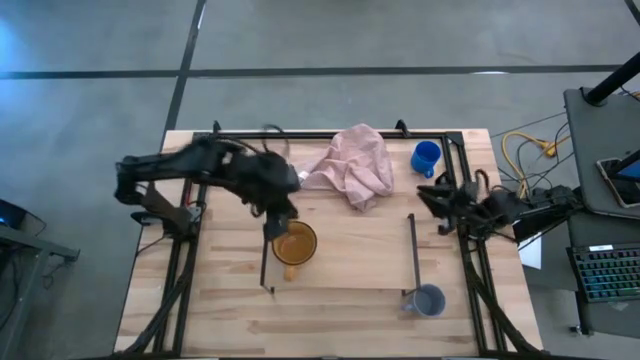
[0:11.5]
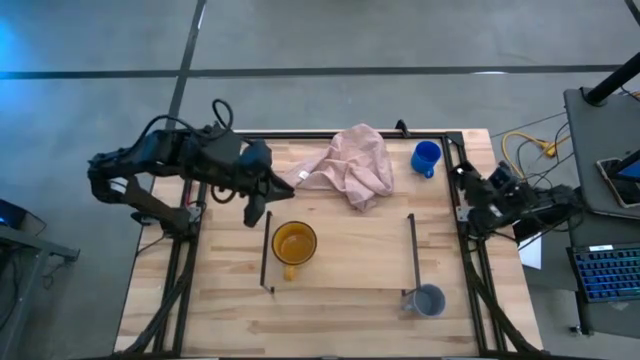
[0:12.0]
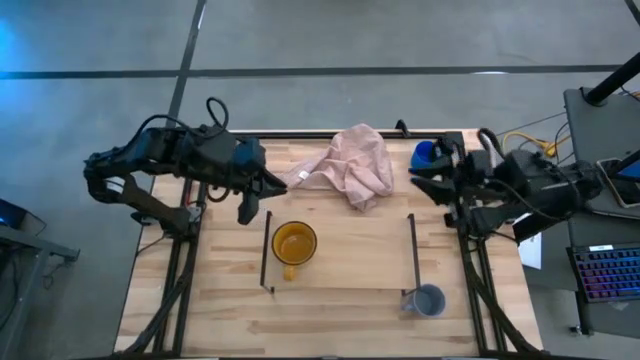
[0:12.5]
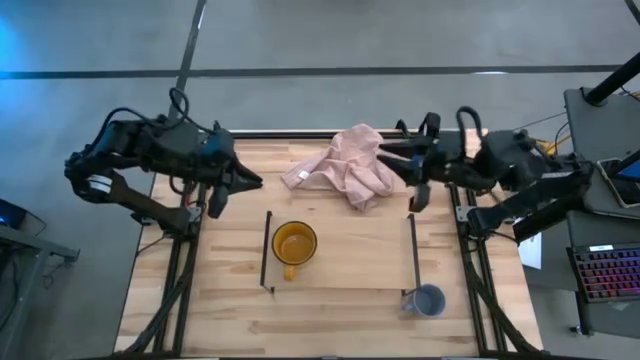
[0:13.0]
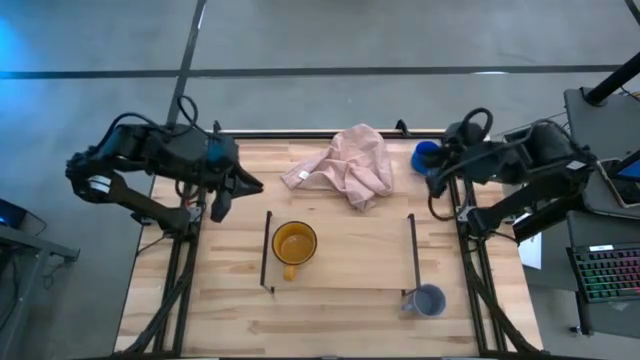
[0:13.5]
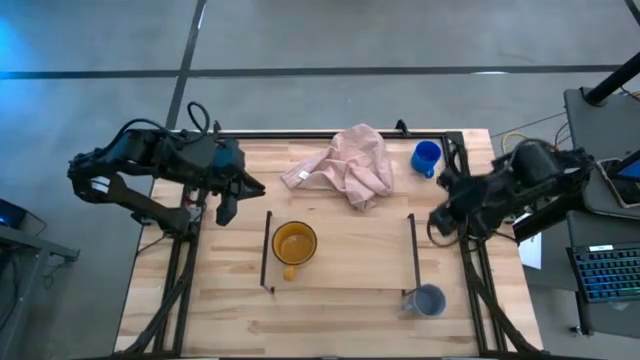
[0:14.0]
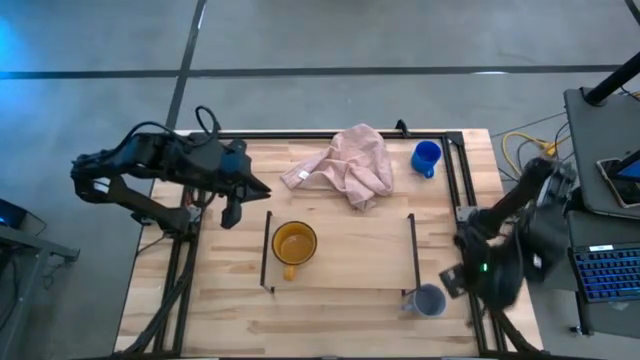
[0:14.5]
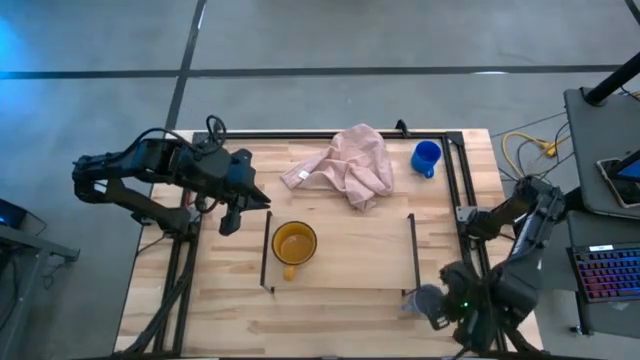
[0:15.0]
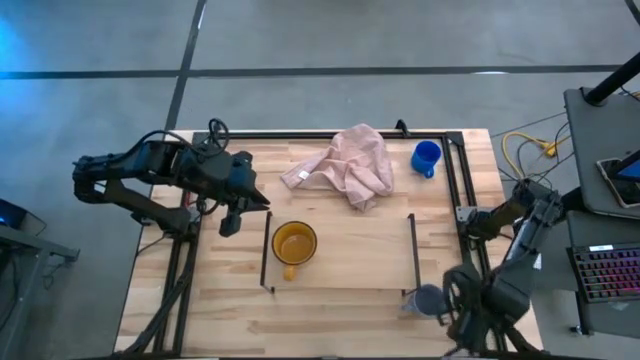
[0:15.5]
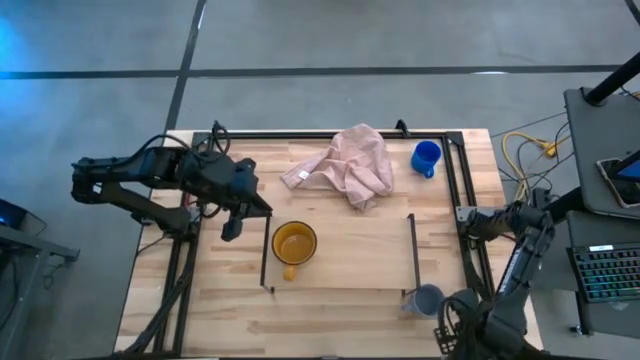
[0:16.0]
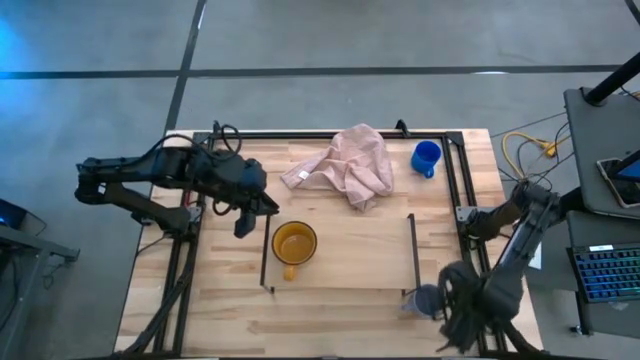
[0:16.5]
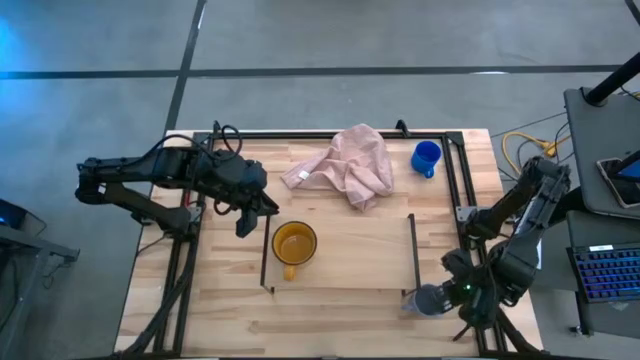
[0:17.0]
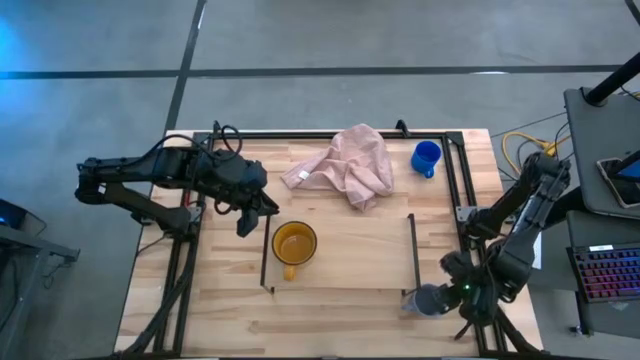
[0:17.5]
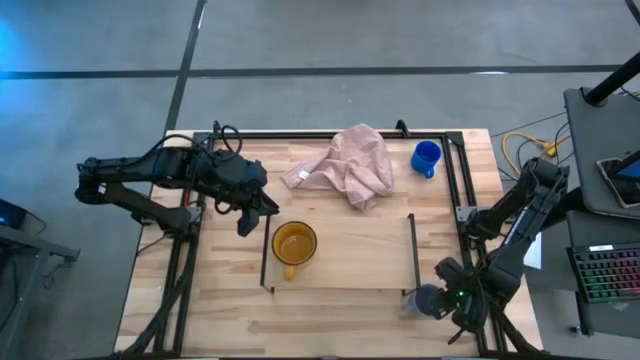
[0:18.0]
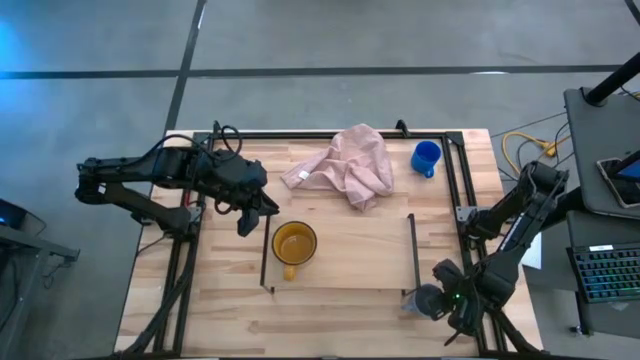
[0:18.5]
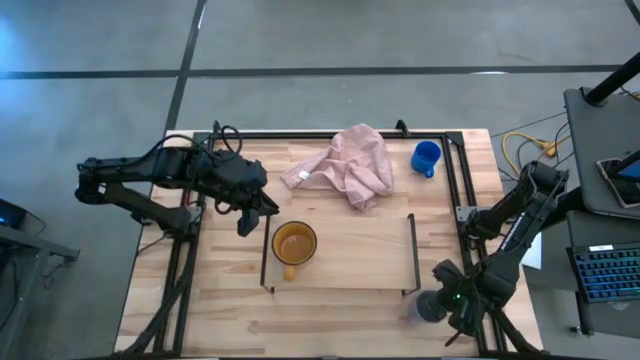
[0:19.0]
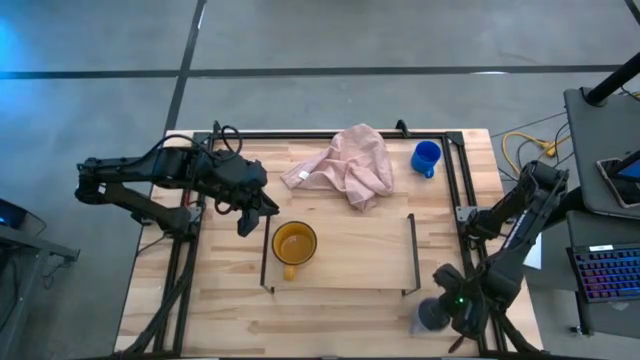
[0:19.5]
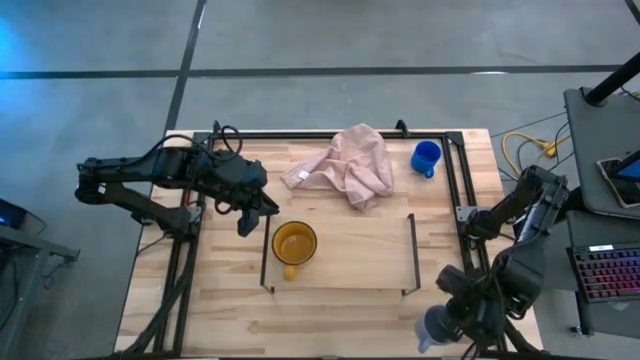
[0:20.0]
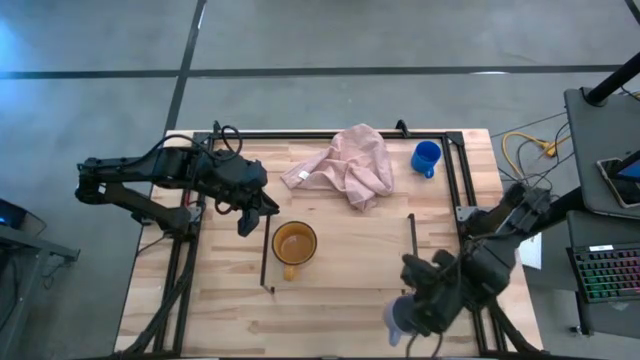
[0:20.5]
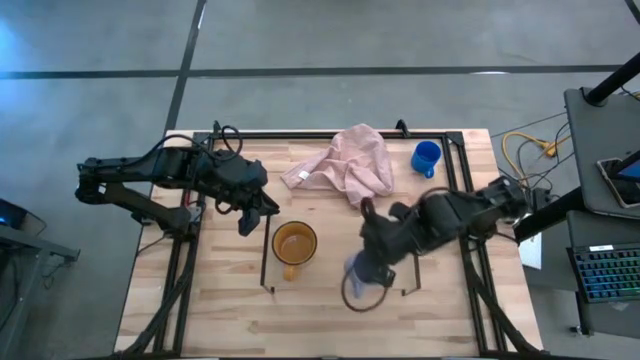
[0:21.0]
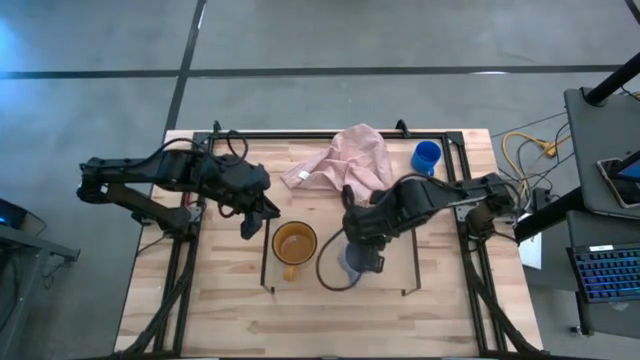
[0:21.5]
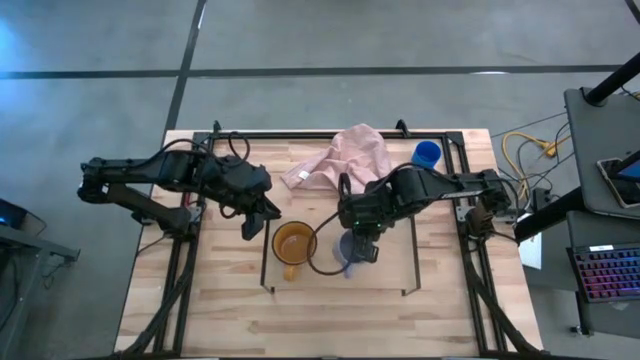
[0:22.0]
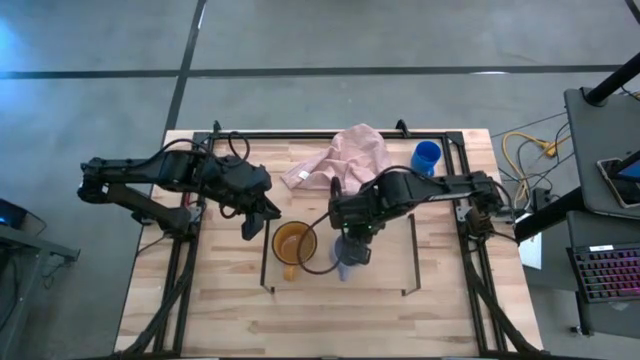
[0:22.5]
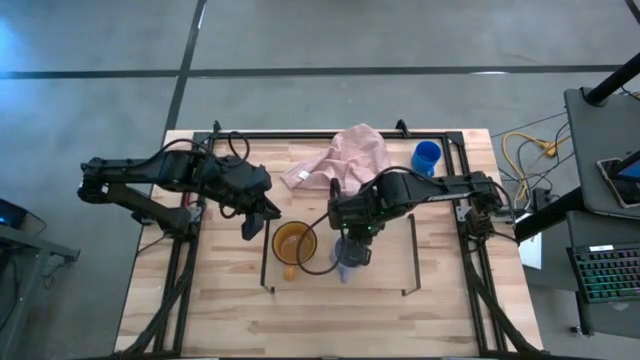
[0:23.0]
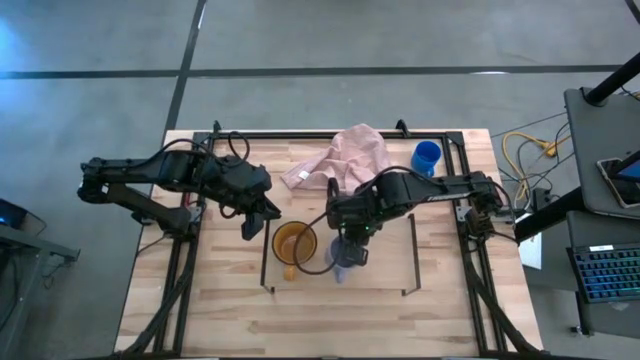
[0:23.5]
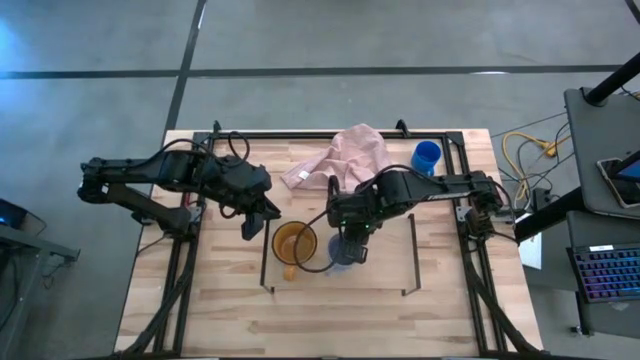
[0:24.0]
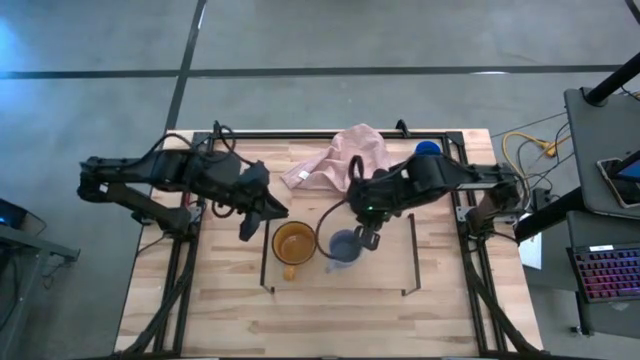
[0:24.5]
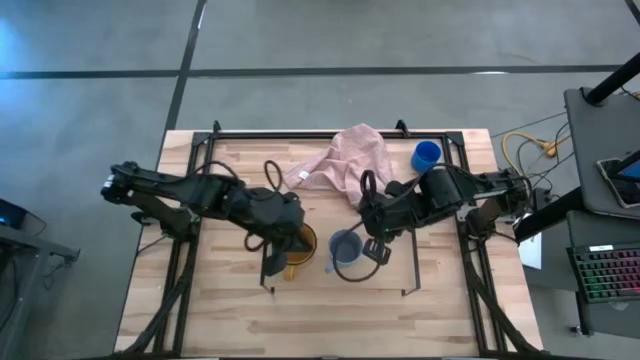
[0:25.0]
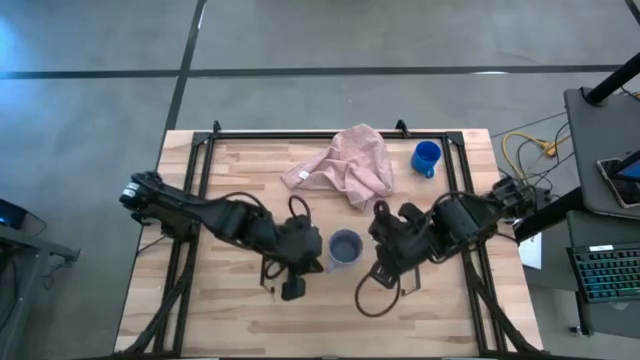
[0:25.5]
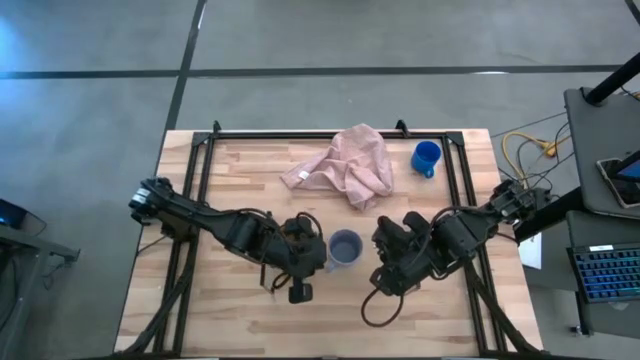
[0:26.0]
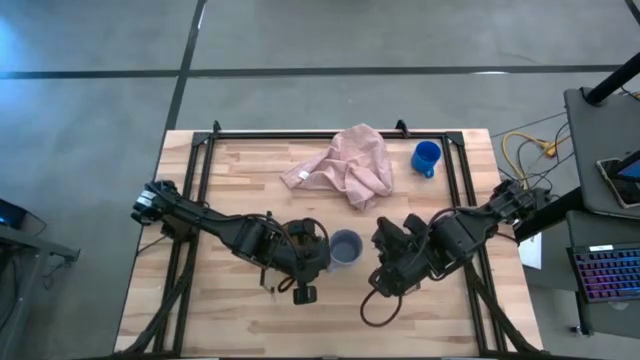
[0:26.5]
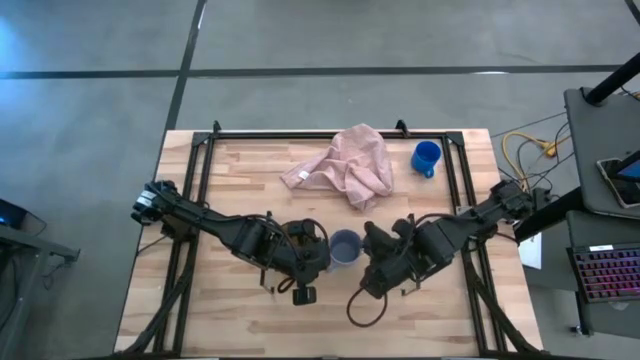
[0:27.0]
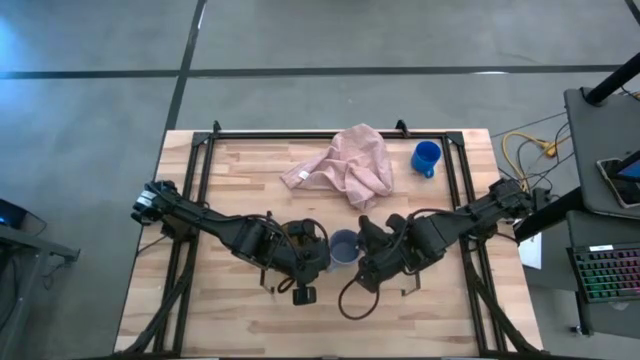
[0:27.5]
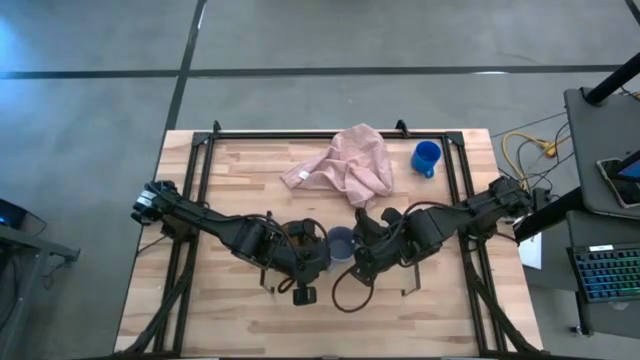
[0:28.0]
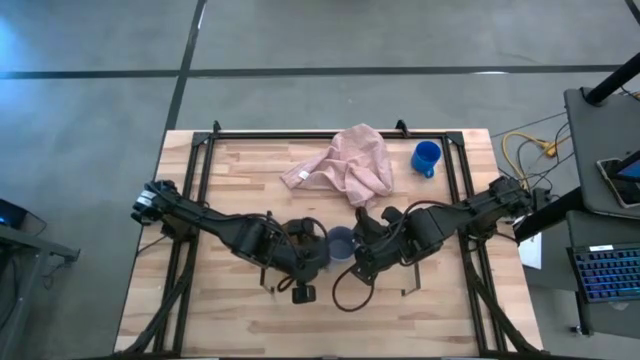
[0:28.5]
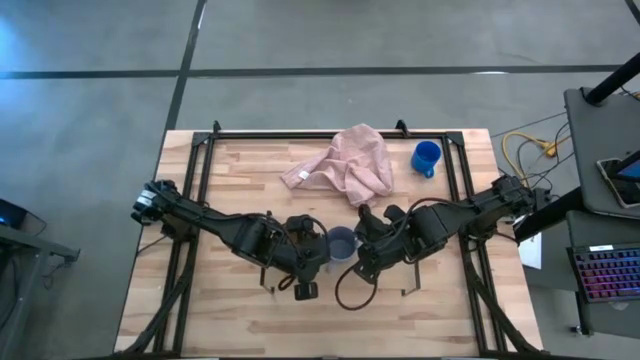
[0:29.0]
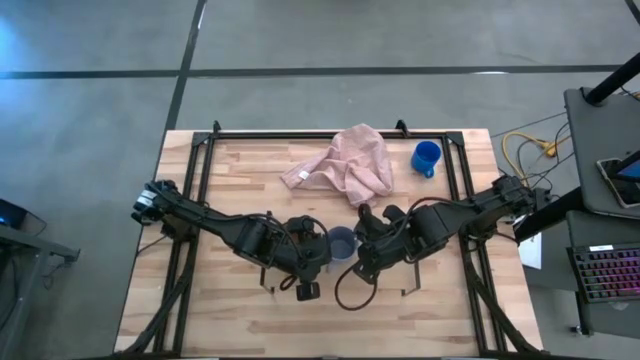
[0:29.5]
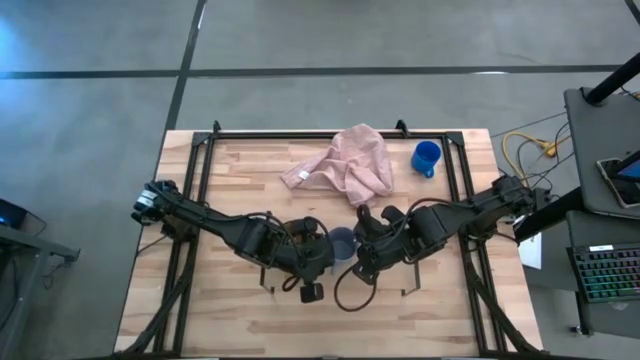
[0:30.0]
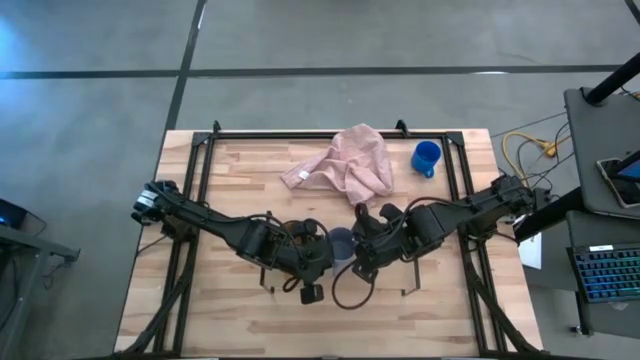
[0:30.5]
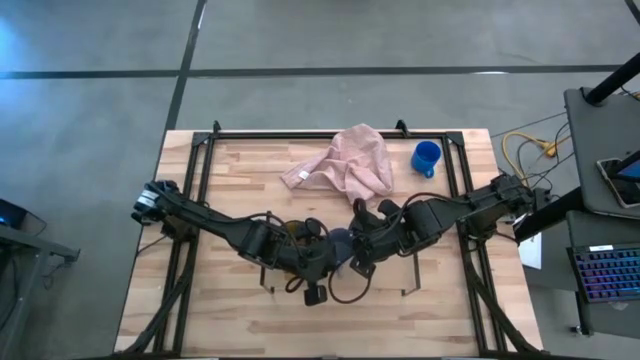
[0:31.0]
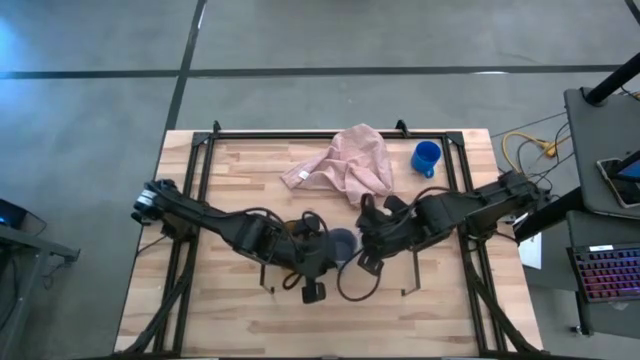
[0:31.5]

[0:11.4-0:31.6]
Task: Stack small to large cups/mugs on shelf
Put the light blue mug on the shelf
